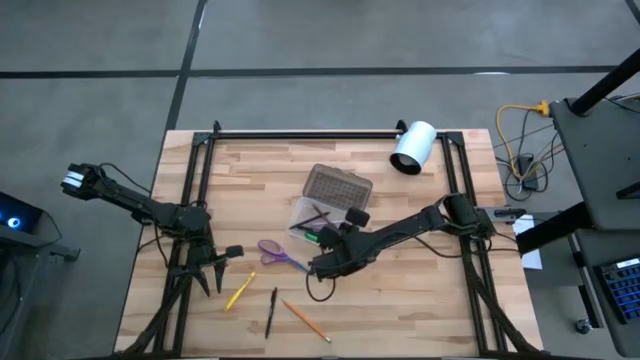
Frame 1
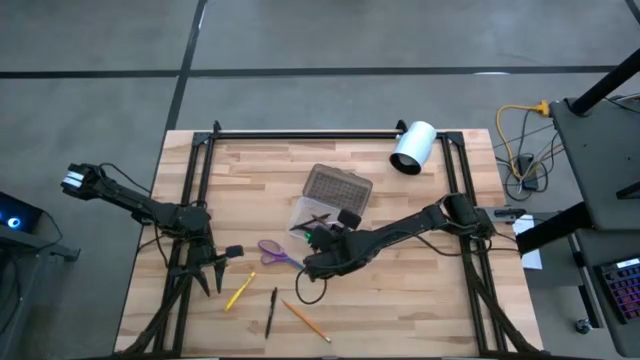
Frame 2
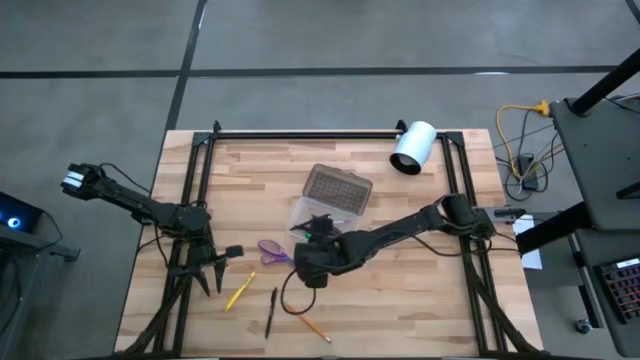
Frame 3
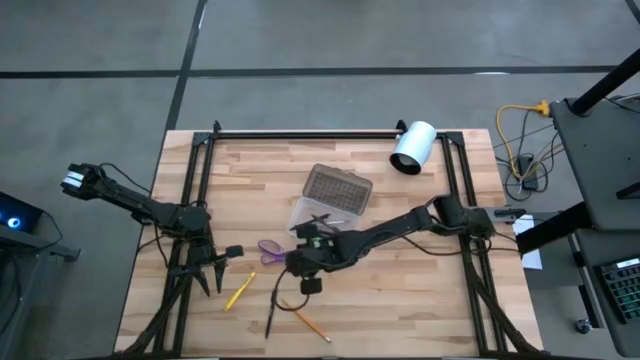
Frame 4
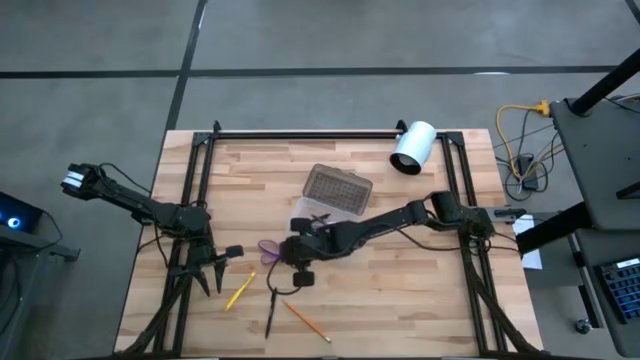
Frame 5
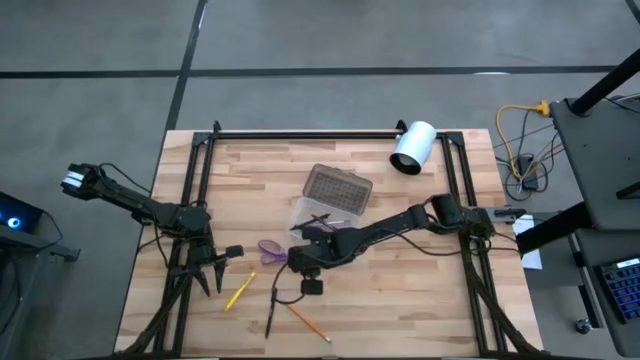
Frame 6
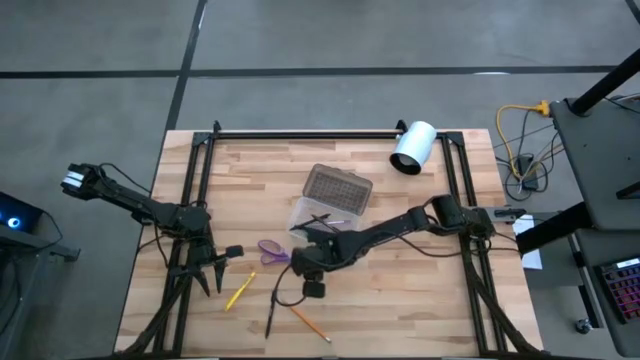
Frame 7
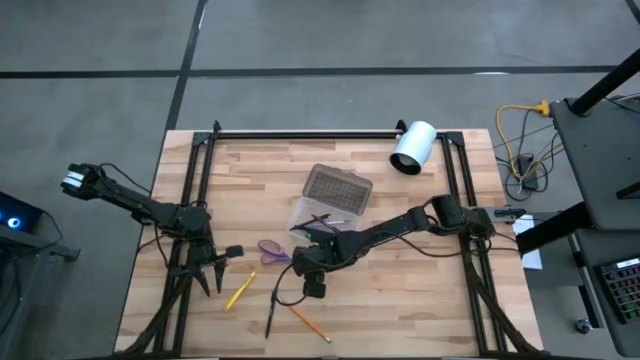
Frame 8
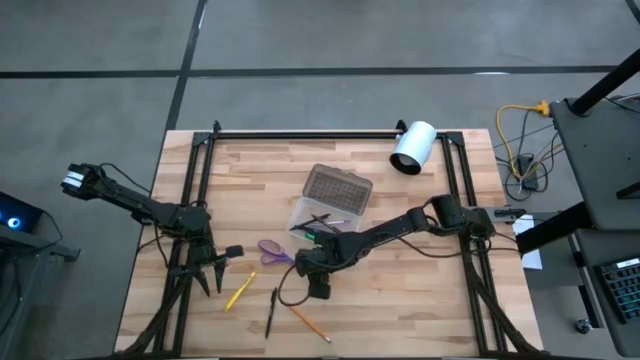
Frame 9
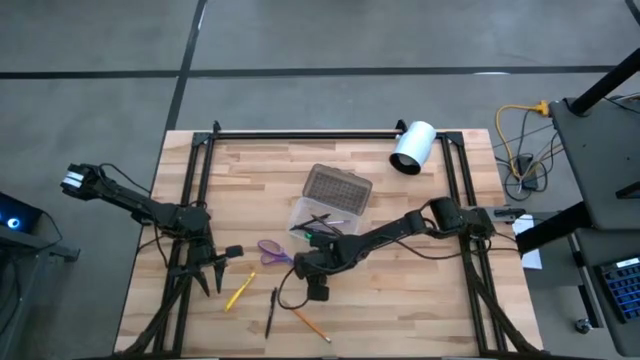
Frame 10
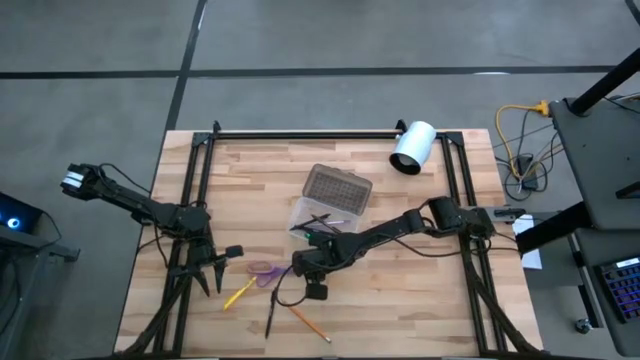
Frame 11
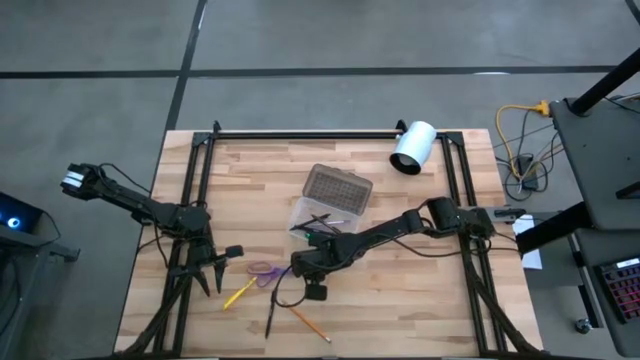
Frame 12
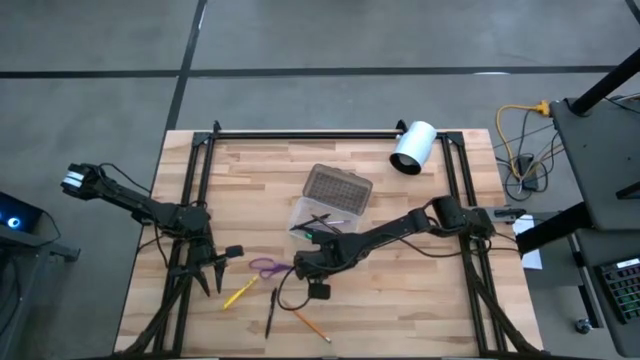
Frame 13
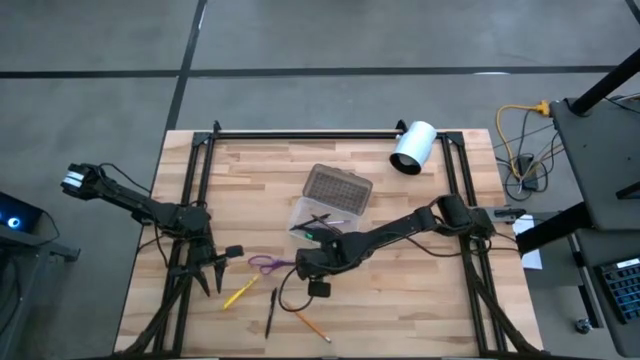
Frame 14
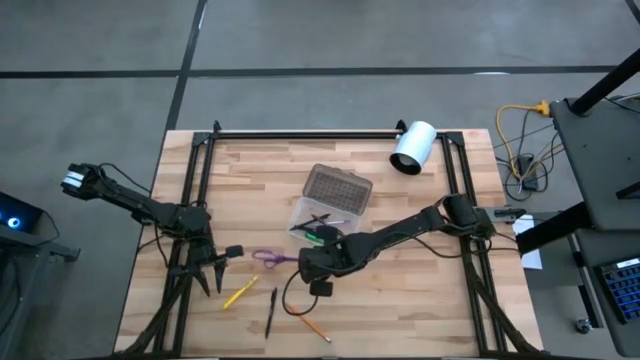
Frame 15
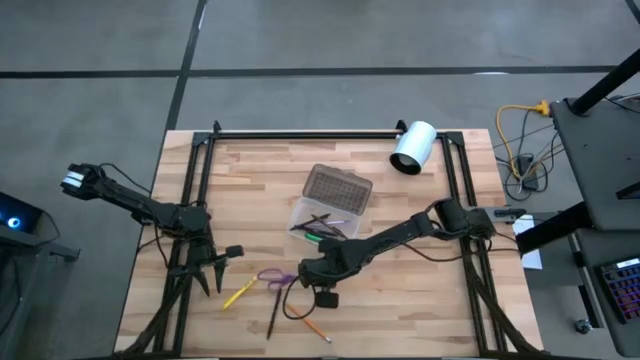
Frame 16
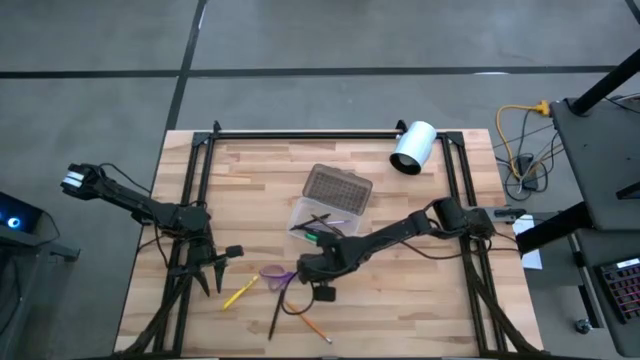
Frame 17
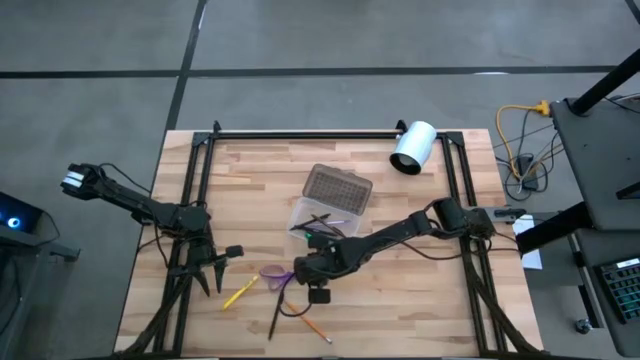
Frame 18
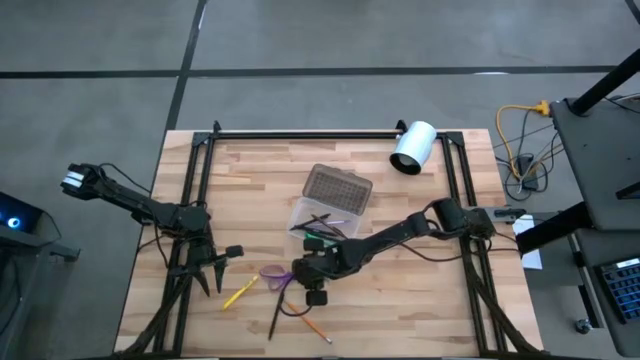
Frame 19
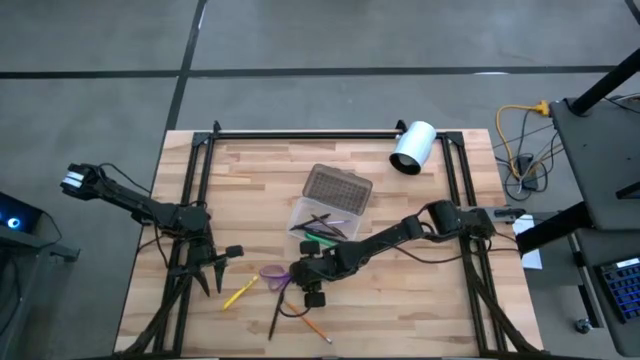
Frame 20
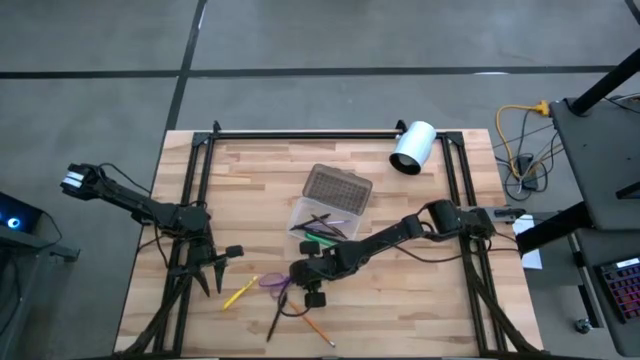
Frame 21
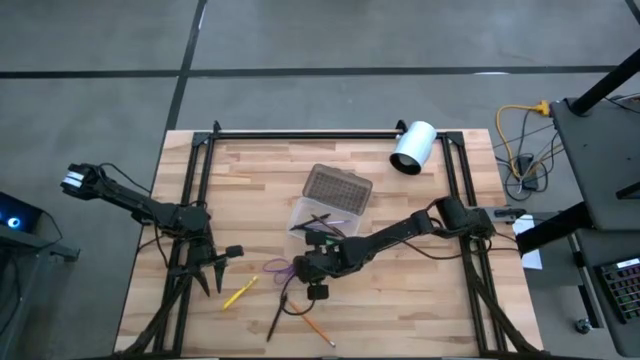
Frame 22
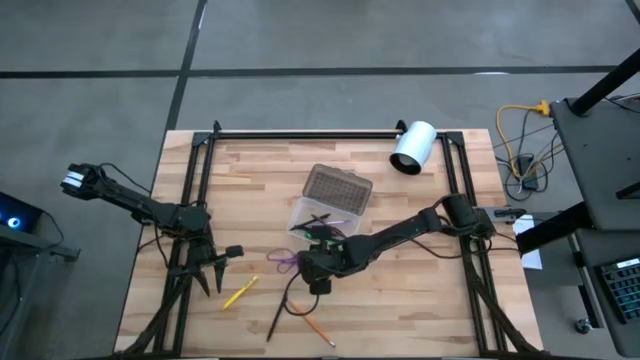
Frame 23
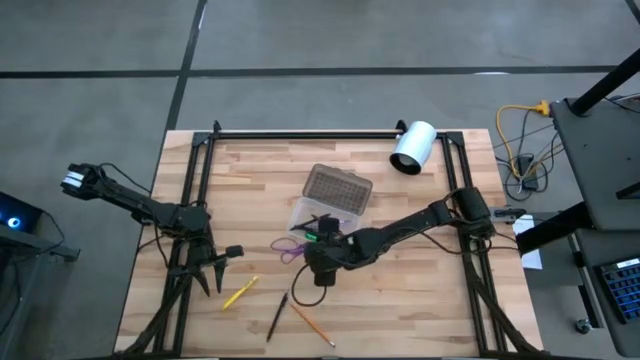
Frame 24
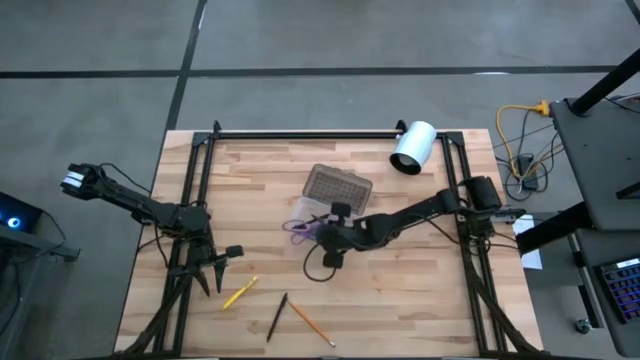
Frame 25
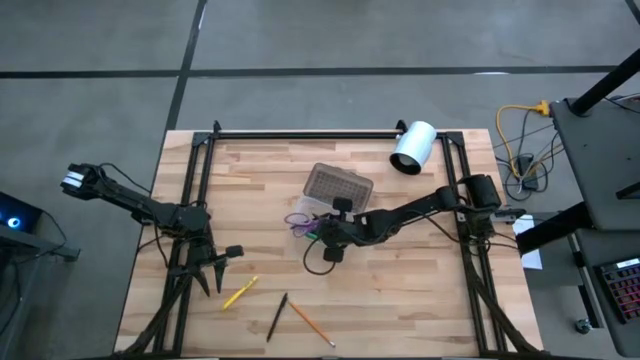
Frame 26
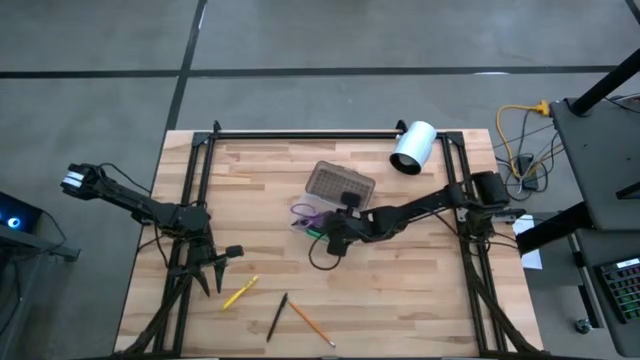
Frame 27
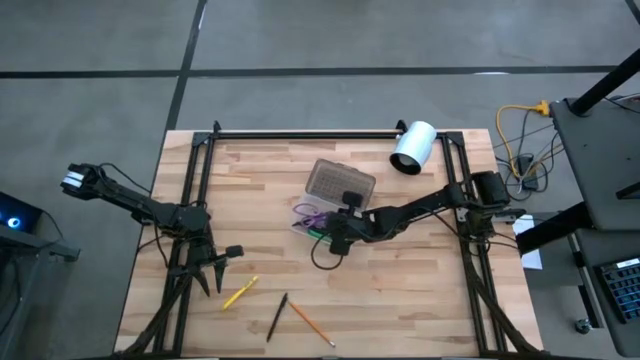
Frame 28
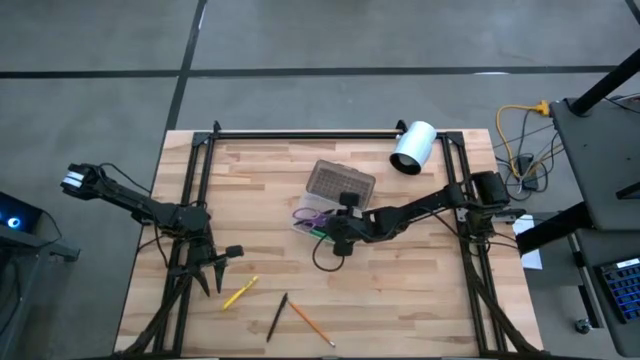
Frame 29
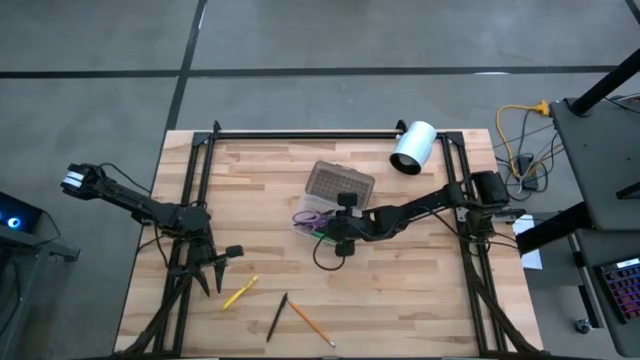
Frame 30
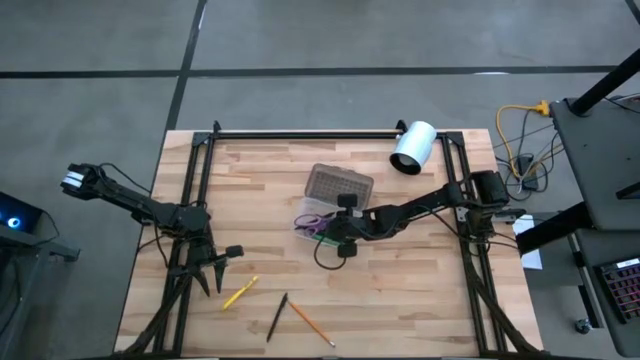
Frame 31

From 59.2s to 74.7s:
Task: Pick & place school supplies into a supply box
Put the violet scissors into the supply box

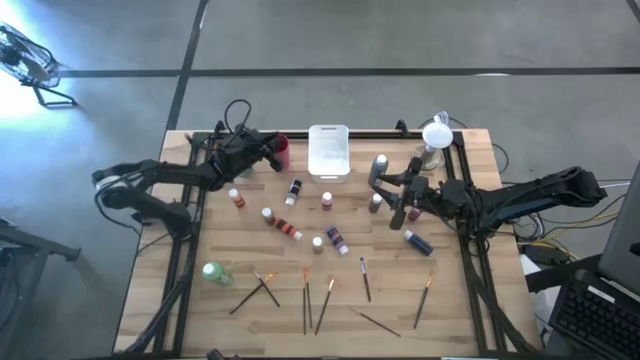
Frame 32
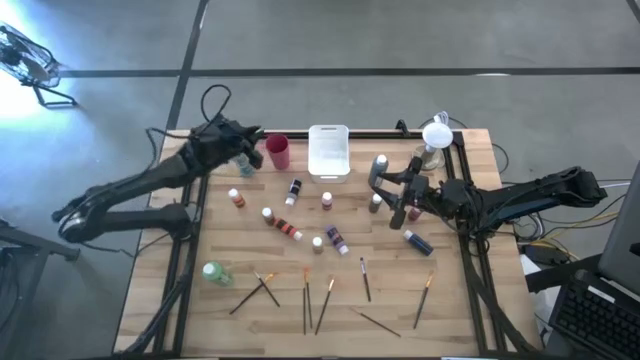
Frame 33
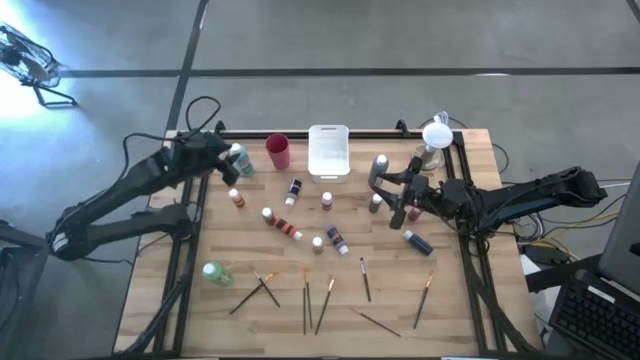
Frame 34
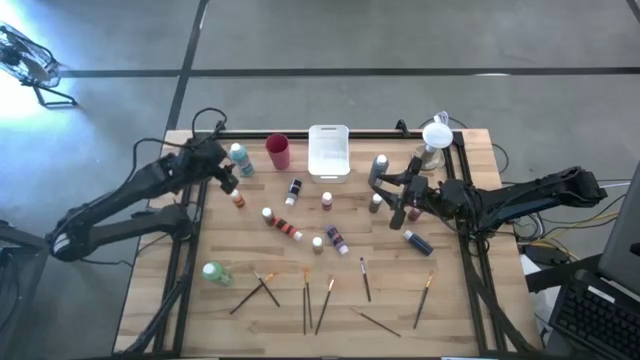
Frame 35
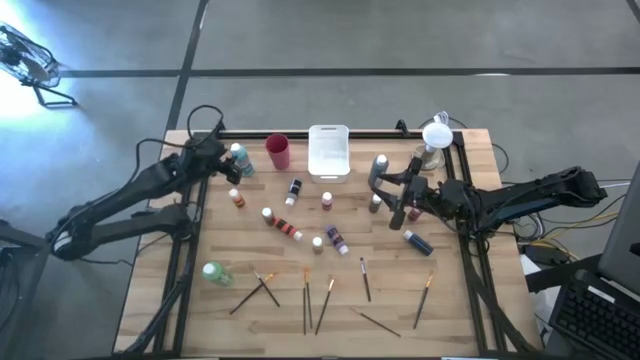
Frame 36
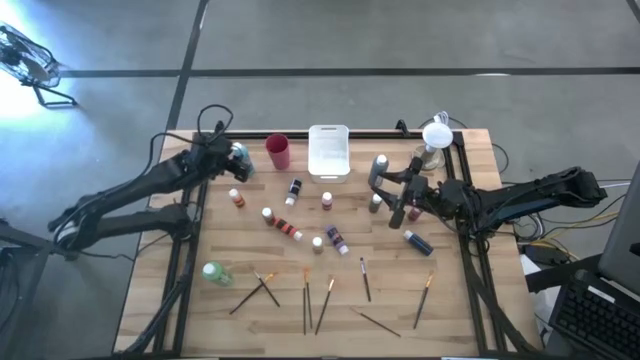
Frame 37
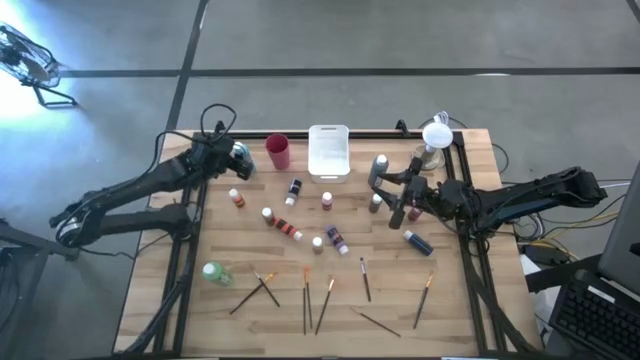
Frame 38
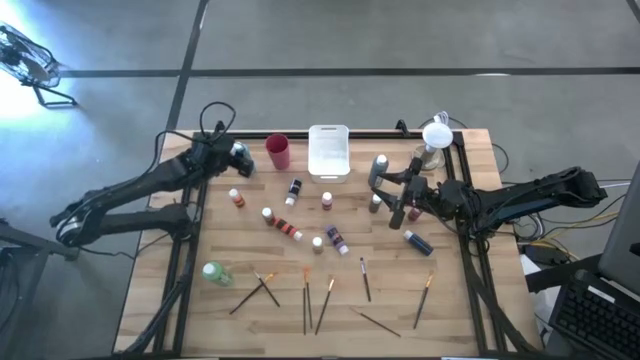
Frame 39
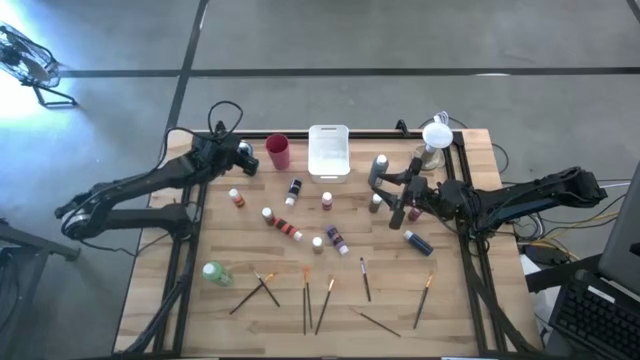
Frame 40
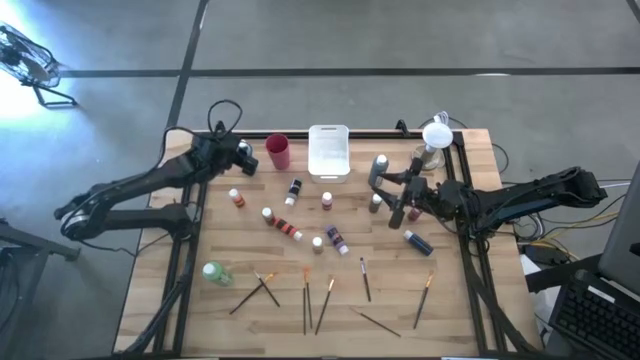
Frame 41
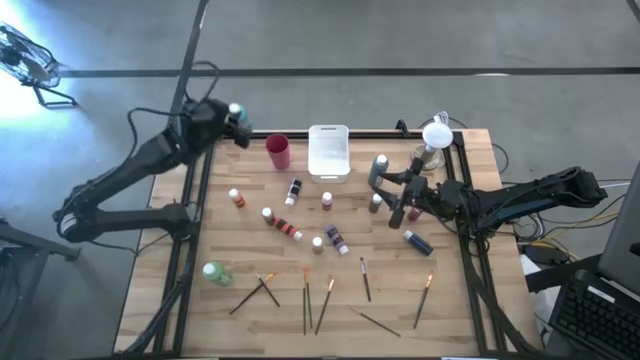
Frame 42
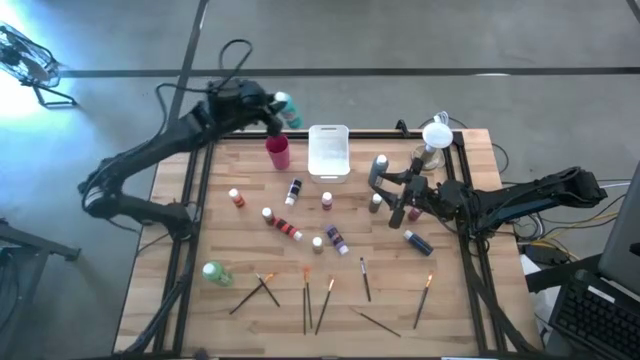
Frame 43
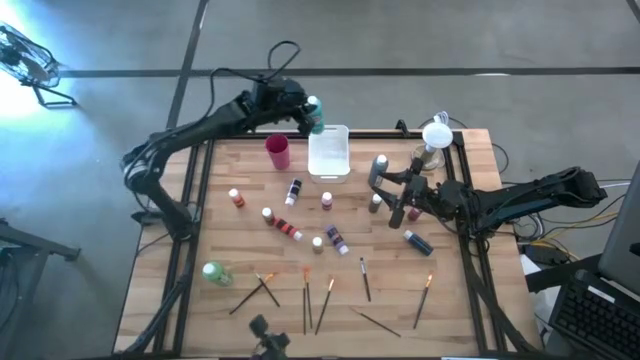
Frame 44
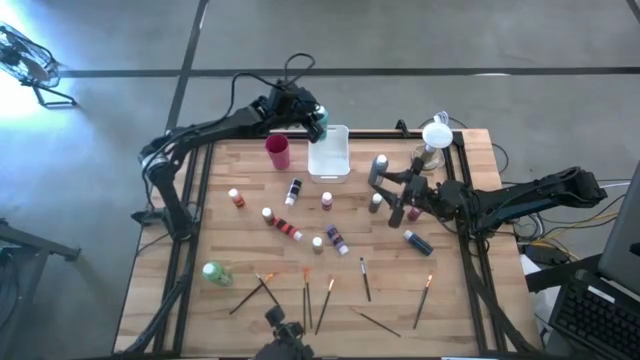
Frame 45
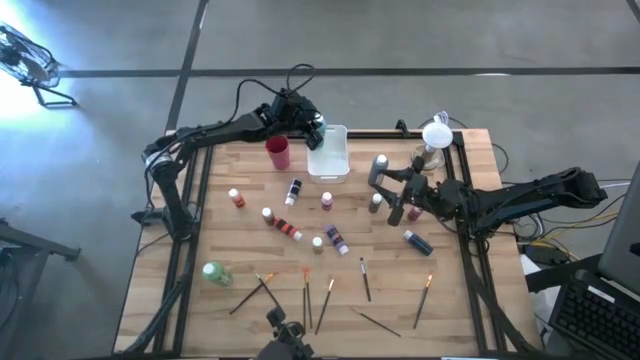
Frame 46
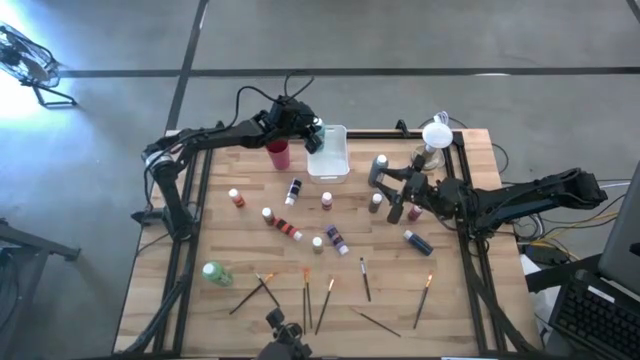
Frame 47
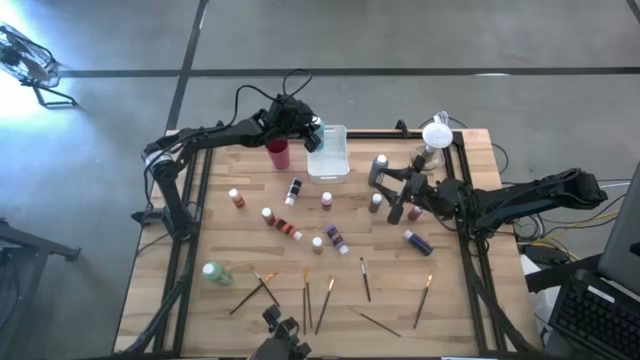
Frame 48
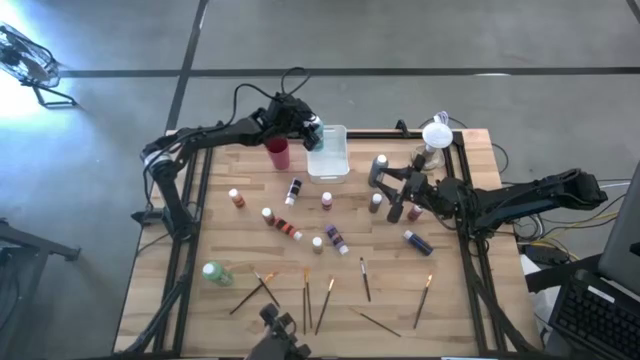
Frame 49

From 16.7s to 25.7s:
Task: Pick & Place Paint Supplies
Put the blue paint bottle into the white bin
